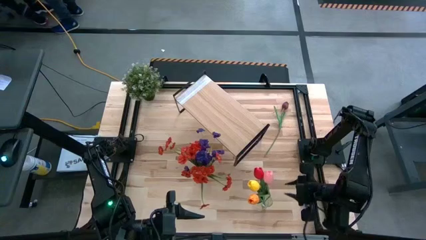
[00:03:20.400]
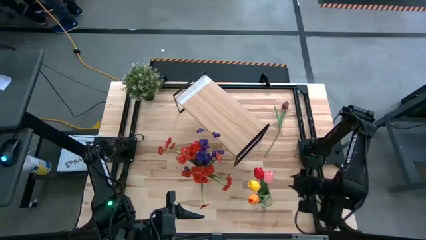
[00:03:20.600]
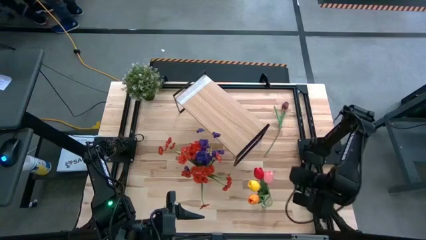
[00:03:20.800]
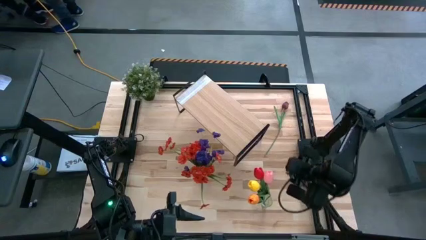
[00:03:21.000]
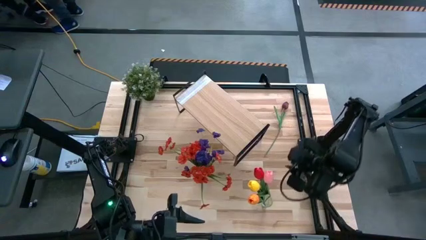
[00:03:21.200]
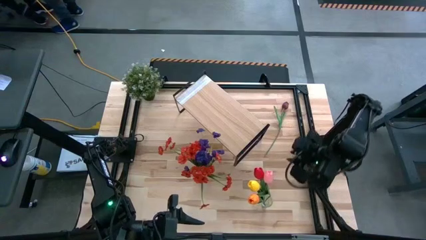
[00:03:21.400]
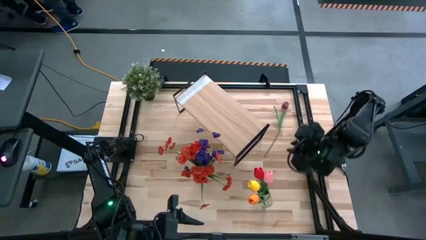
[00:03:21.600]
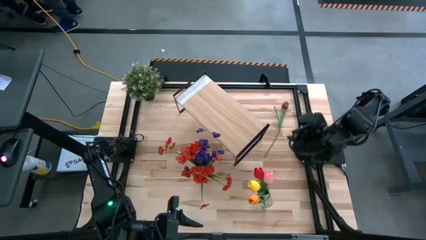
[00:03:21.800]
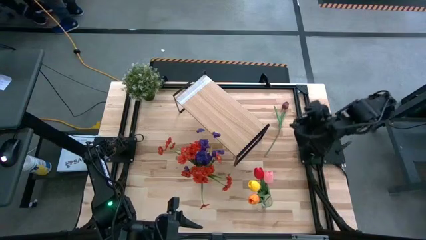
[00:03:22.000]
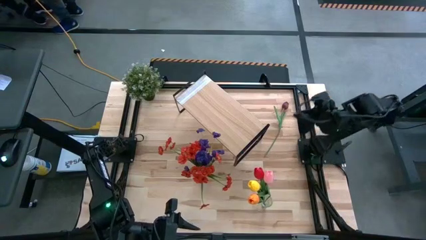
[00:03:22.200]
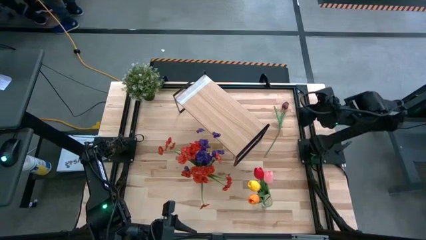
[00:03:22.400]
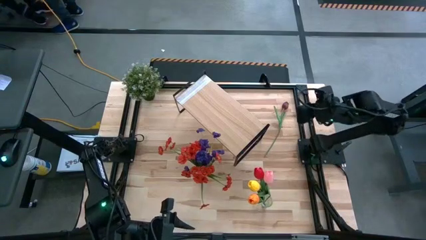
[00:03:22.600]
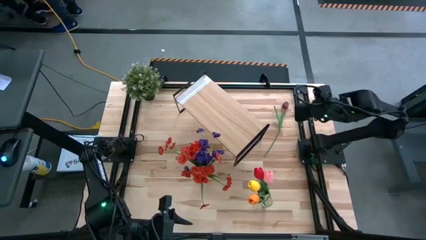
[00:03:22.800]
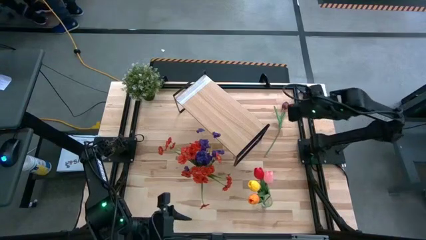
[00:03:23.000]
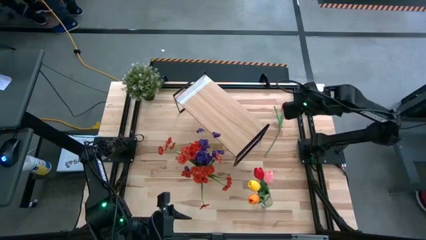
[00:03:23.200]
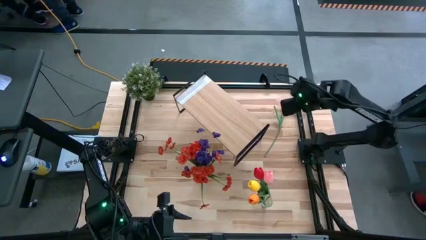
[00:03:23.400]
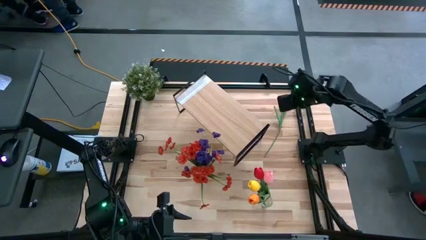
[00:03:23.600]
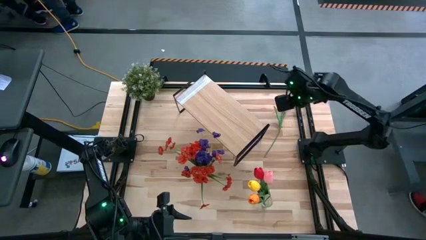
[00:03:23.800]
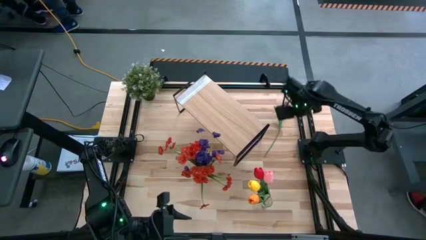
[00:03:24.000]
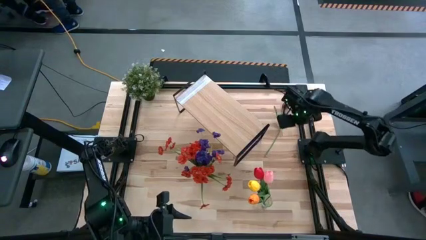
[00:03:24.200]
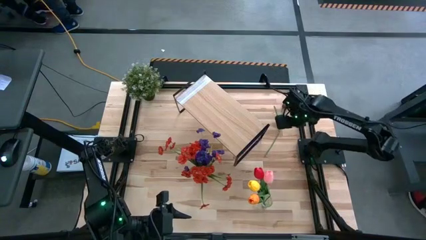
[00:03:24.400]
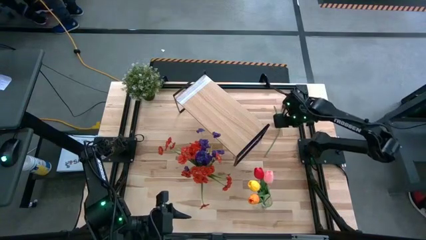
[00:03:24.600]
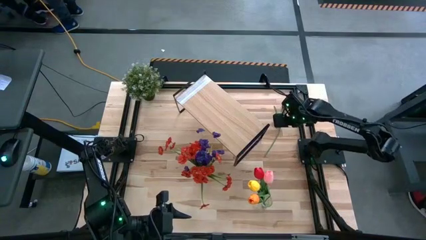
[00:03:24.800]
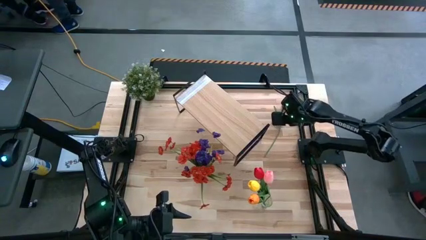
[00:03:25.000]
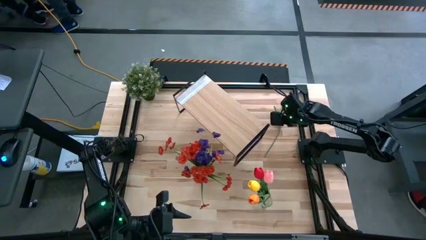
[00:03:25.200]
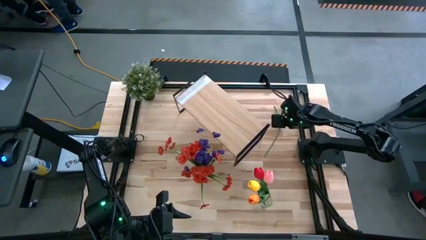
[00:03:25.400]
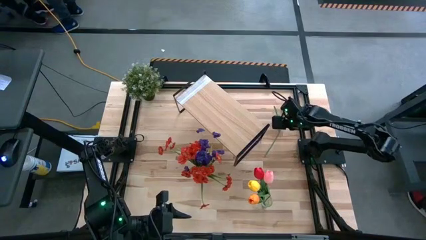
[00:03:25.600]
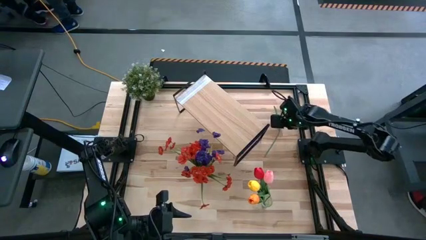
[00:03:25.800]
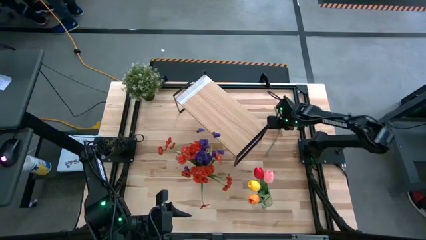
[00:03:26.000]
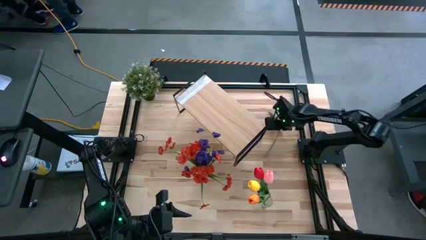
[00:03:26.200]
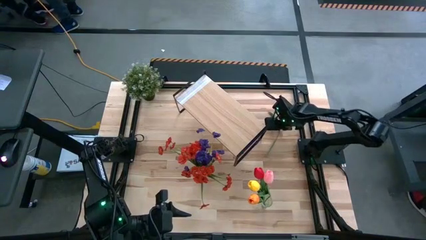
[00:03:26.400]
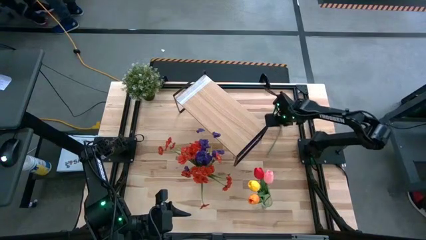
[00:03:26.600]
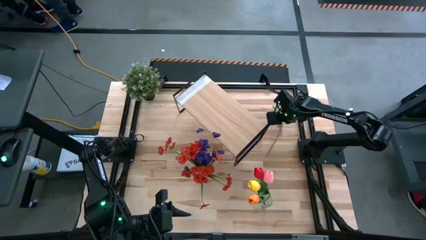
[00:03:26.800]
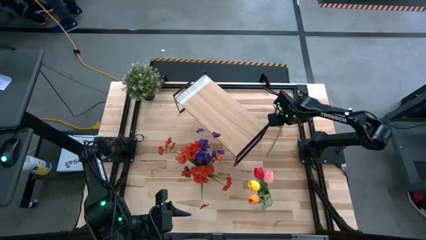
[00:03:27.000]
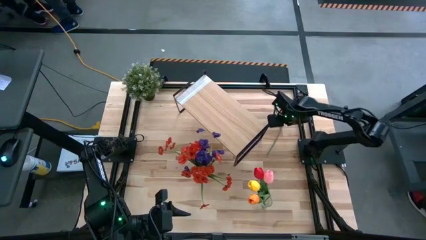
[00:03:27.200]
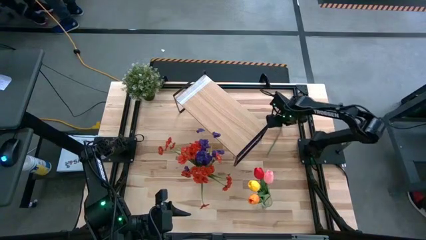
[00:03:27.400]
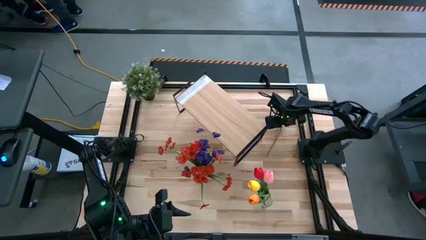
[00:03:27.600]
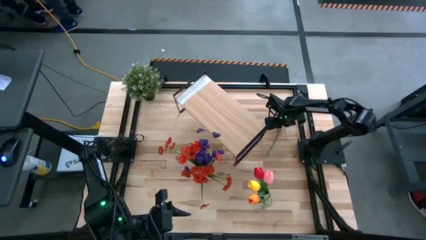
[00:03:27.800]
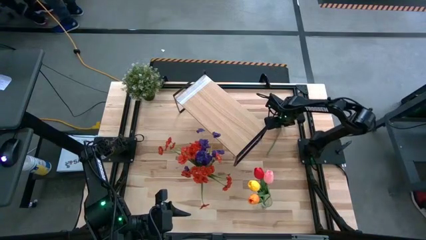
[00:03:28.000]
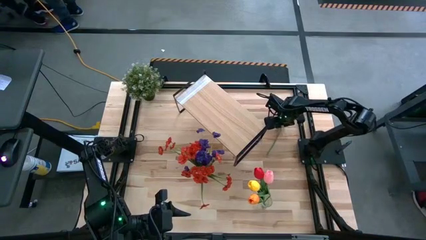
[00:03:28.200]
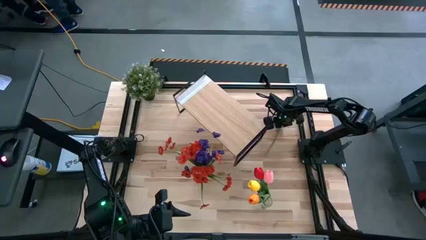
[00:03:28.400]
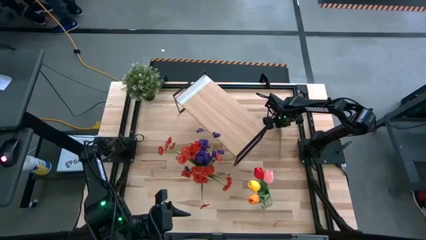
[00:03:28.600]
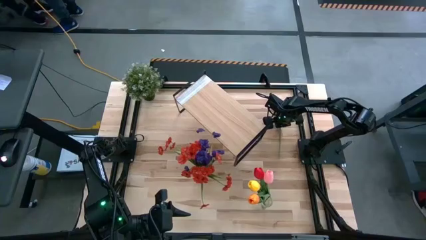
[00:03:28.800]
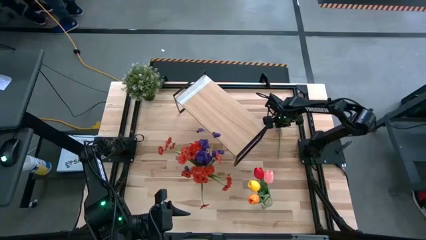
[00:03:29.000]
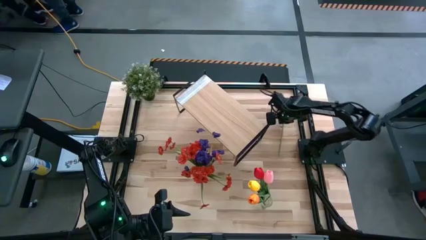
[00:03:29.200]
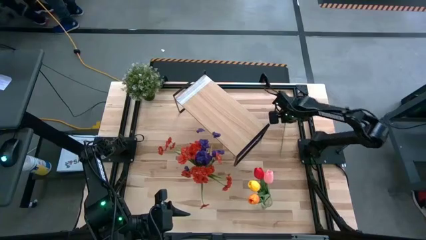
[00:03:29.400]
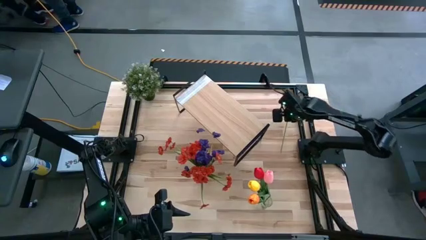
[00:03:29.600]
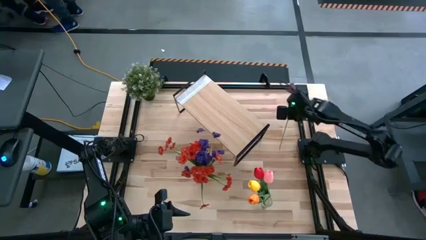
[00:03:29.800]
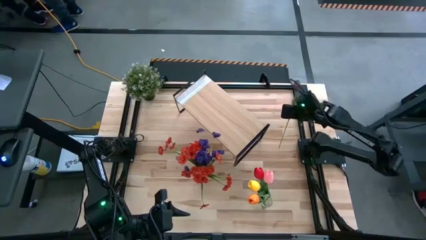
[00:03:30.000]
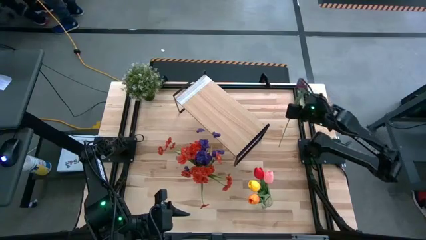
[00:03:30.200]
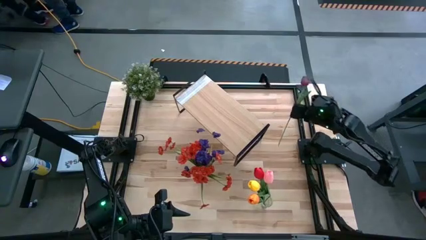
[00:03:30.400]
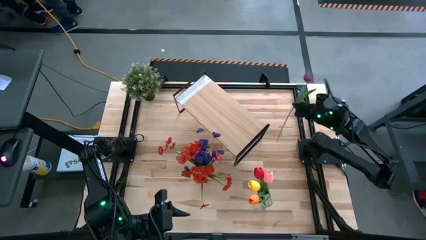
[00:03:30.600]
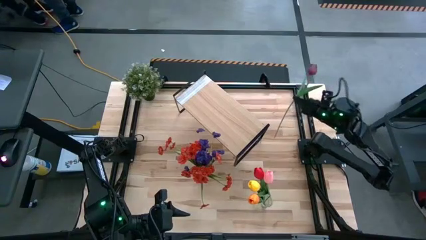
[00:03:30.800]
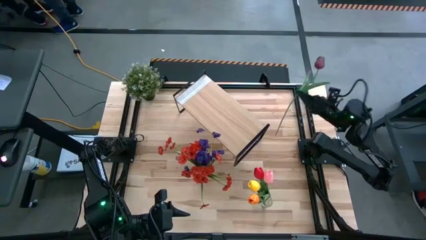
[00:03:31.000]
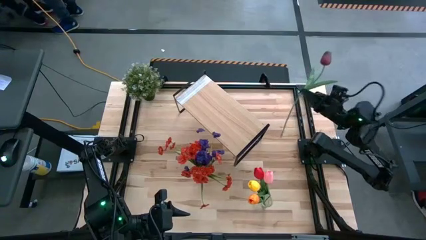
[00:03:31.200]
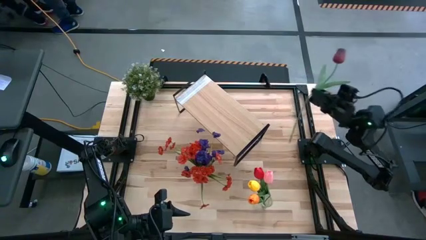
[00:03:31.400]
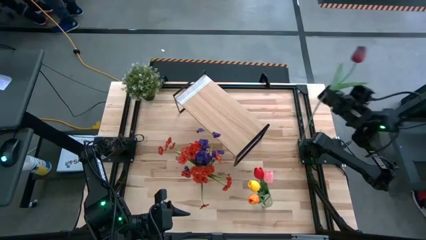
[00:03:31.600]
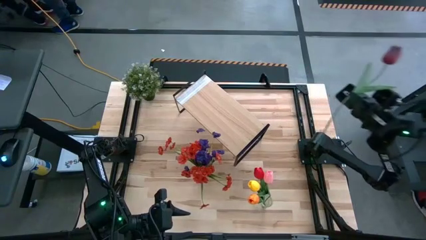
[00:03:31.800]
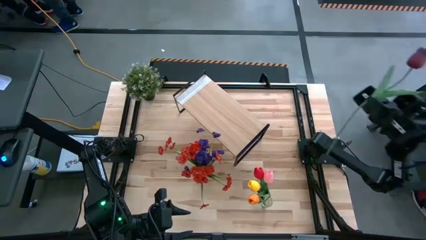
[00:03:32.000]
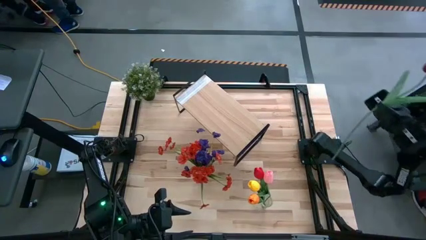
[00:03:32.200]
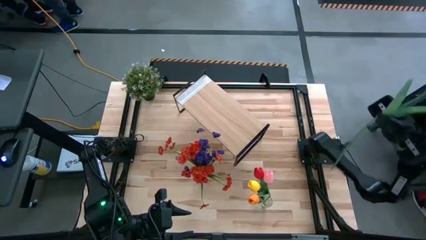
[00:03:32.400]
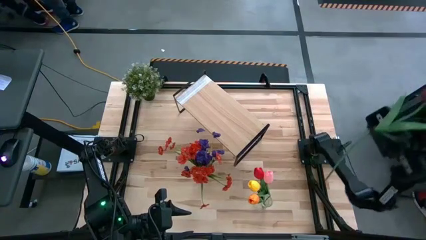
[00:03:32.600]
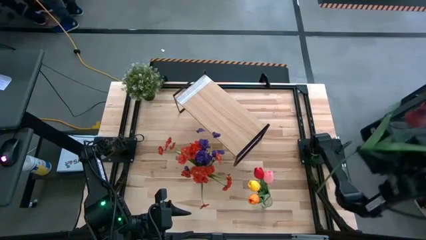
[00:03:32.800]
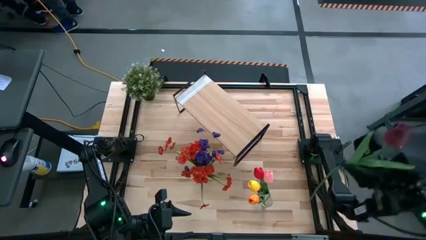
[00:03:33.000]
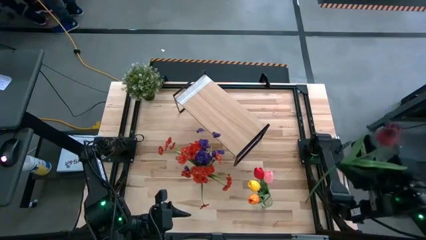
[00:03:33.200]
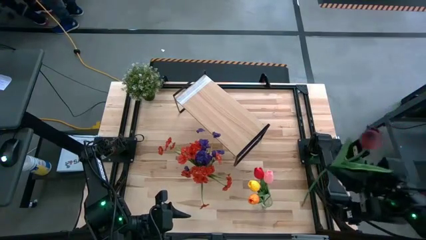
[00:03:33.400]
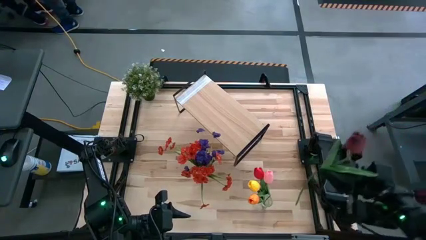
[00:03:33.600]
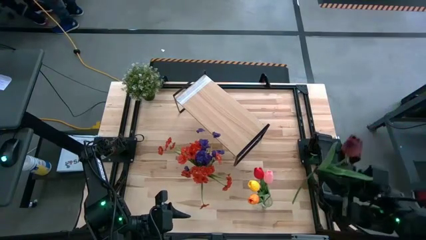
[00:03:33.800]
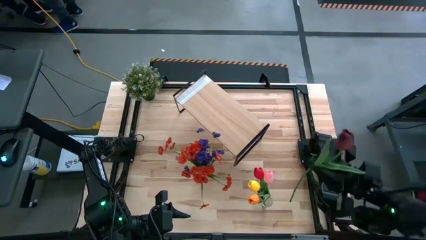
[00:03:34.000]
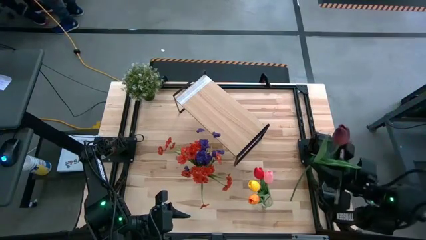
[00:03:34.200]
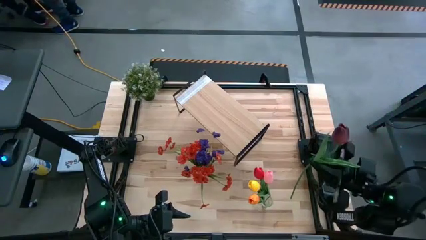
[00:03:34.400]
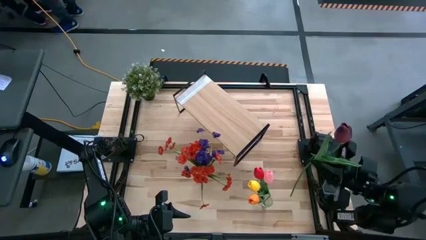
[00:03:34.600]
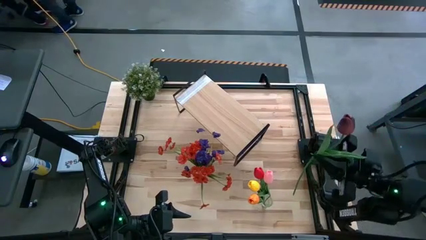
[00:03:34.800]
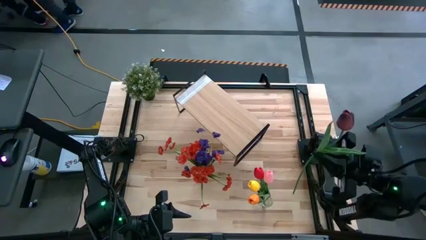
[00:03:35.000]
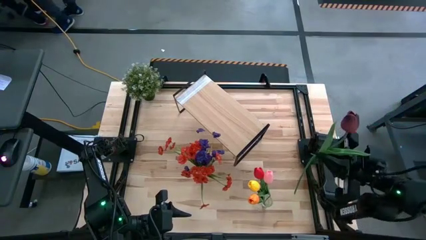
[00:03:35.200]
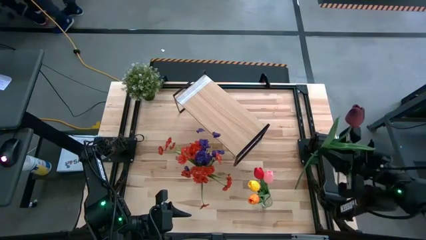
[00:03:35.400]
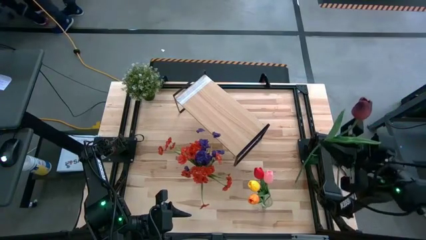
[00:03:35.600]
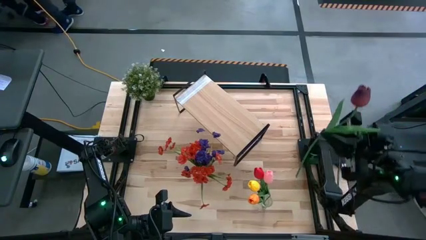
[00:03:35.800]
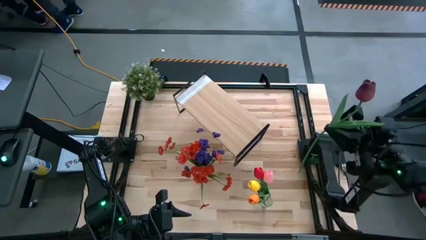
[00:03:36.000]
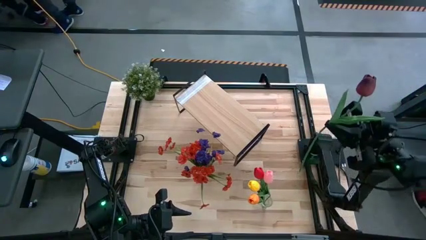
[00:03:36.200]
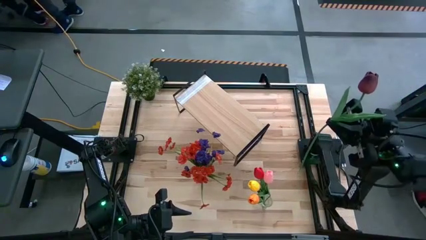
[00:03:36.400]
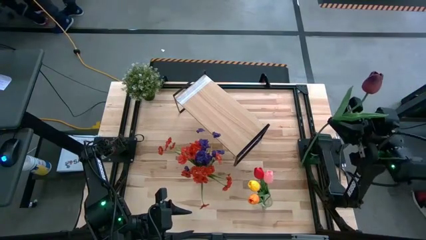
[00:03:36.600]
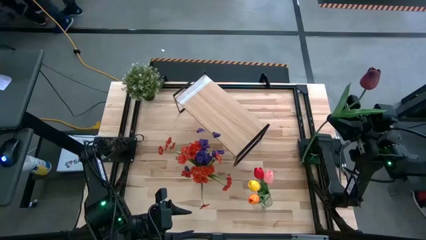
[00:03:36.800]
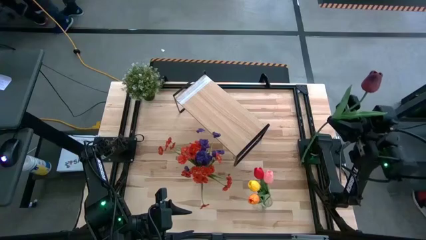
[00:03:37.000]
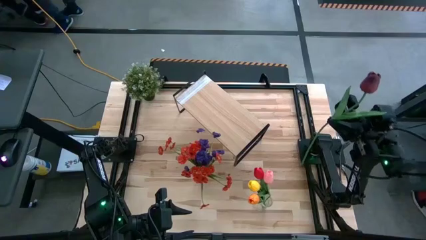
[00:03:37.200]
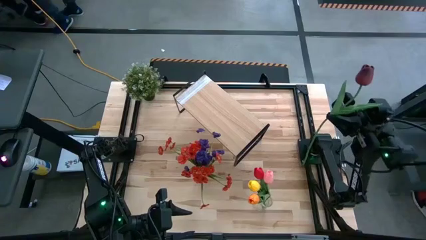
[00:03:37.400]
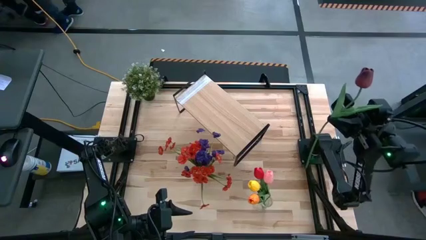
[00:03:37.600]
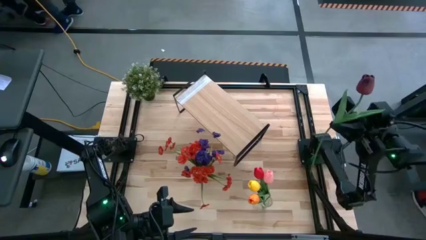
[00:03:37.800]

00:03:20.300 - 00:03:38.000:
Task: Pick and place flowers into a vace then onto a shelf
Put the dark red tulip into the right transparent vase
